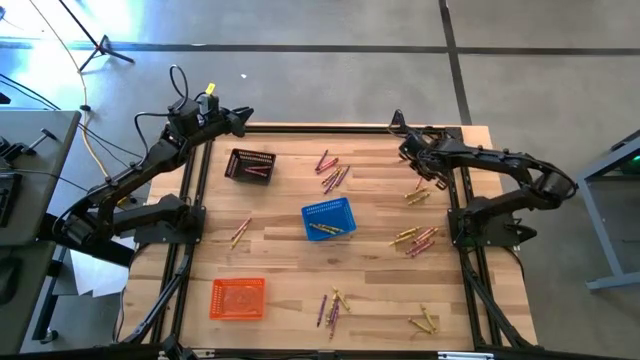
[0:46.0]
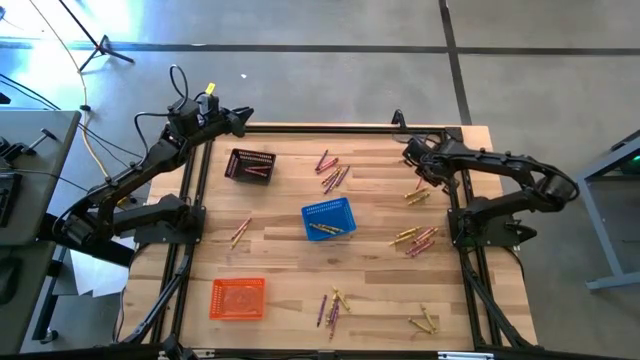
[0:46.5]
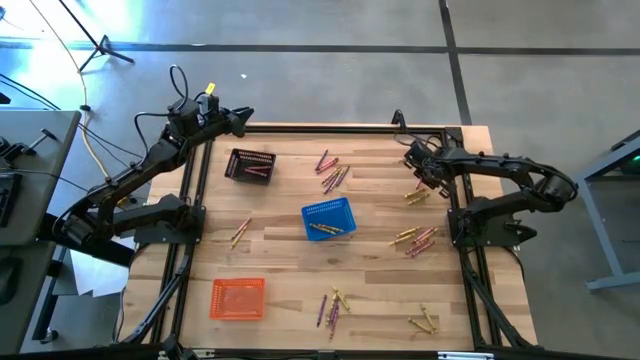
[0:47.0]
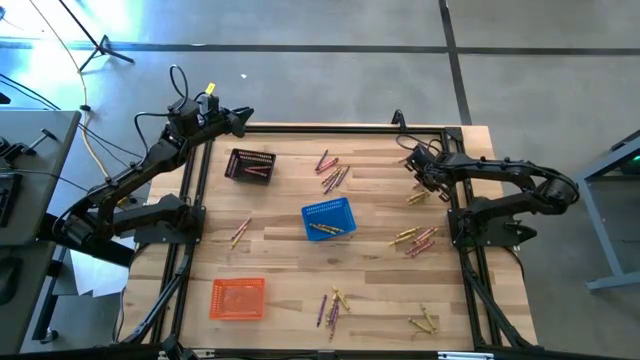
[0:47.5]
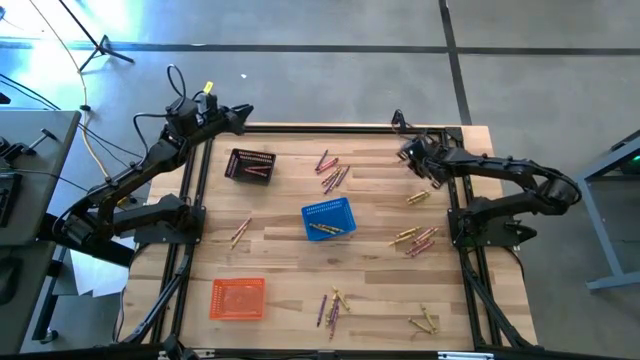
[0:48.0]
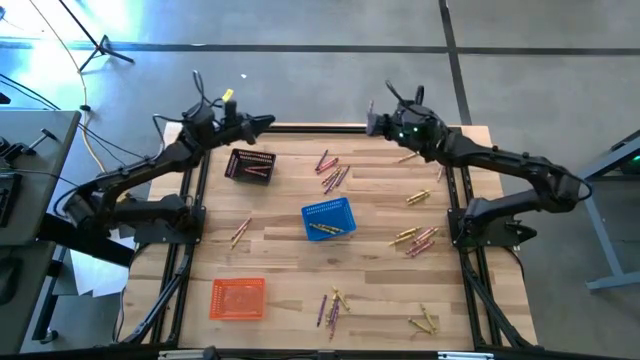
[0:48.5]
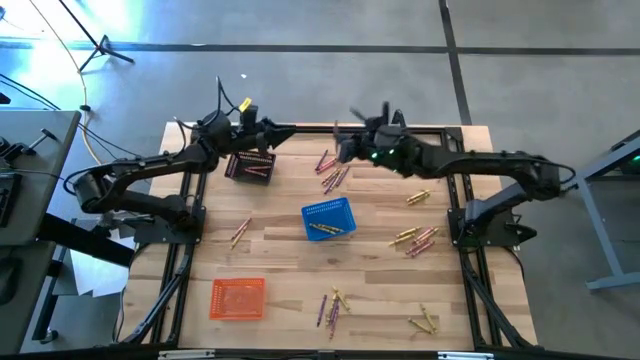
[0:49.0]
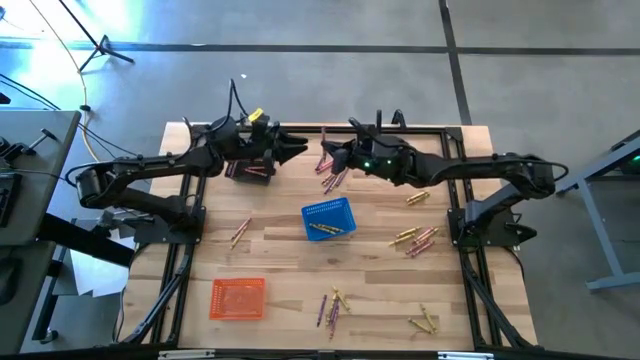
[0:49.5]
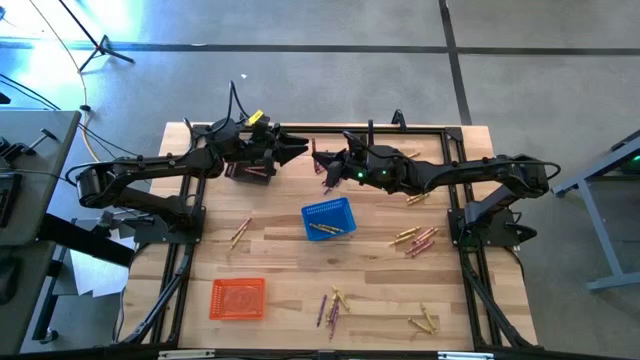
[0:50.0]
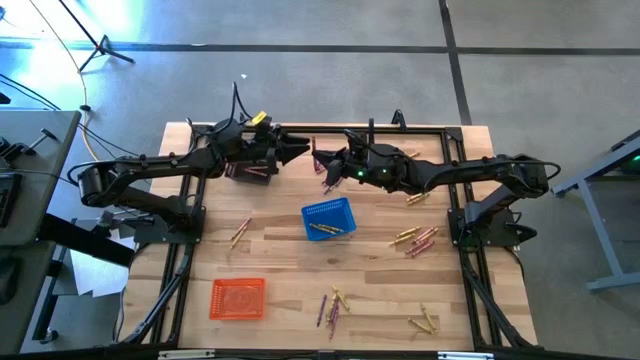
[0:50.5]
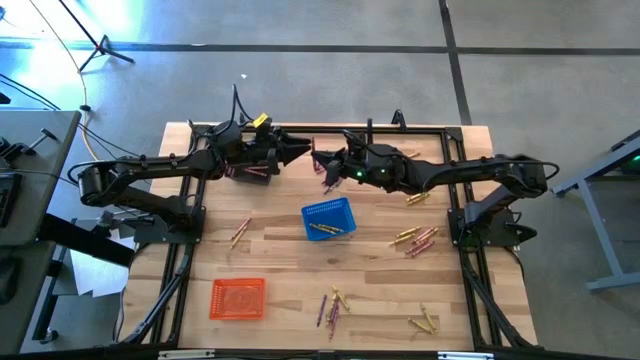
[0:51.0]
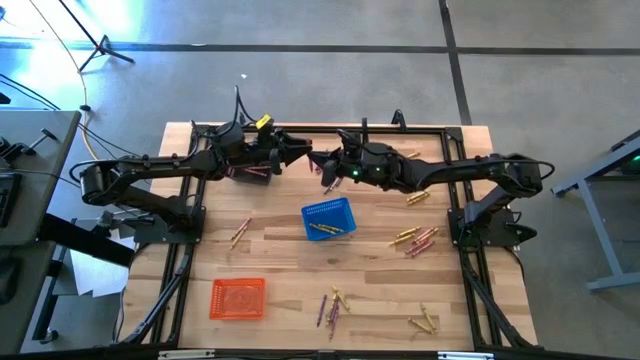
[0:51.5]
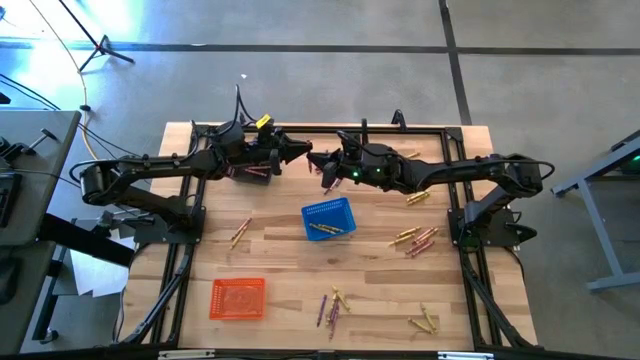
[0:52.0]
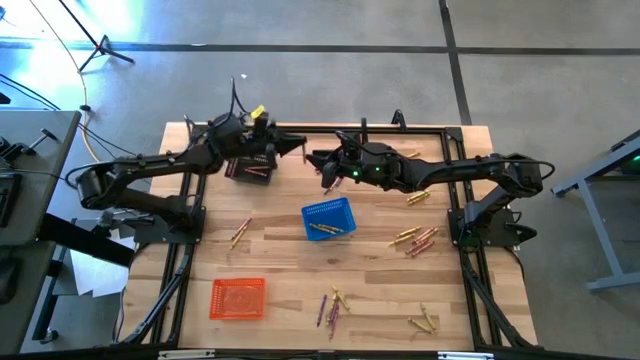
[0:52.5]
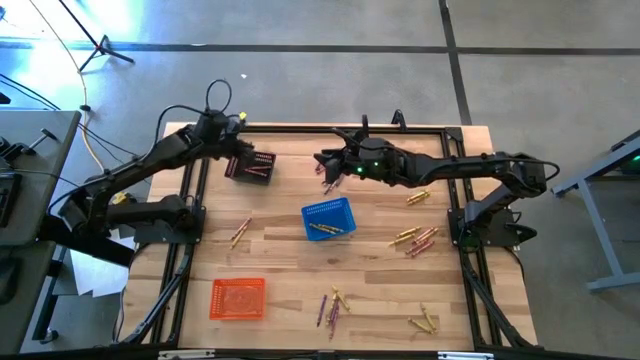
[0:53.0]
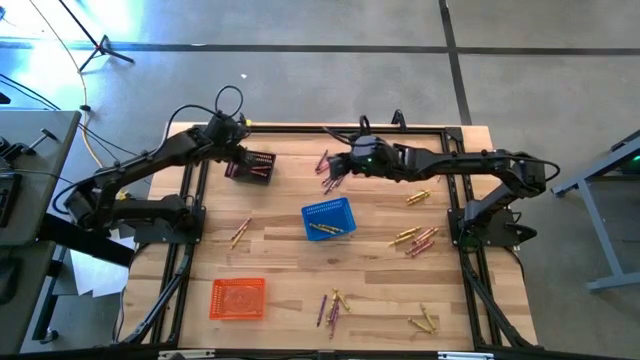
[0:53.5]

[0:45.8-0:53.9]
Task: Sort crayons
Put the red crayon into the black basket

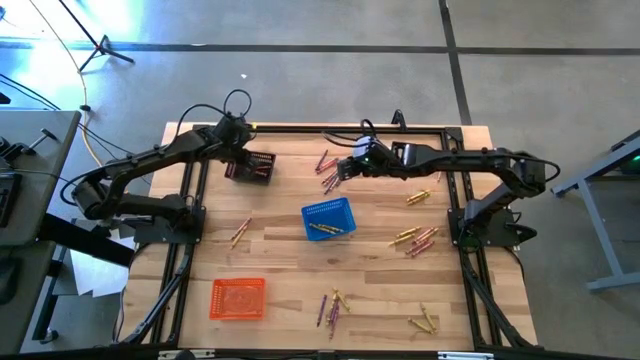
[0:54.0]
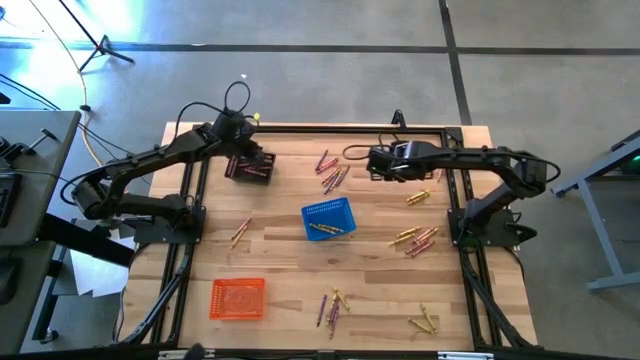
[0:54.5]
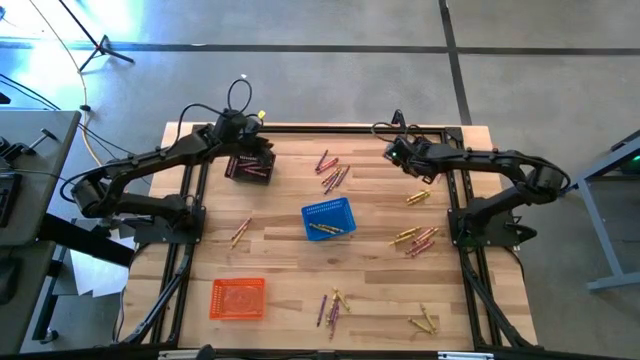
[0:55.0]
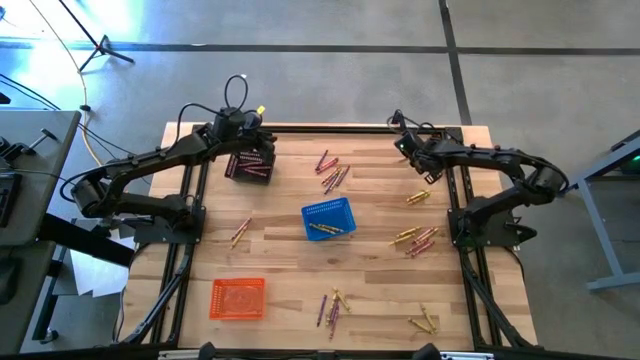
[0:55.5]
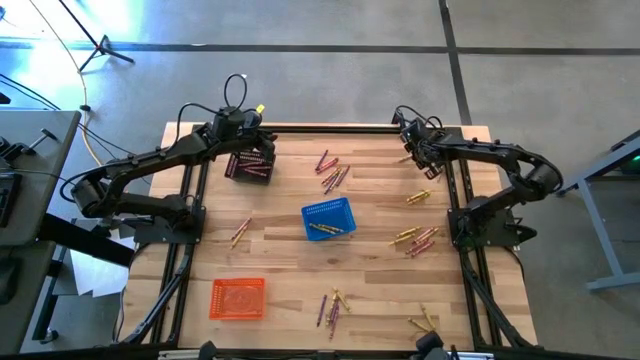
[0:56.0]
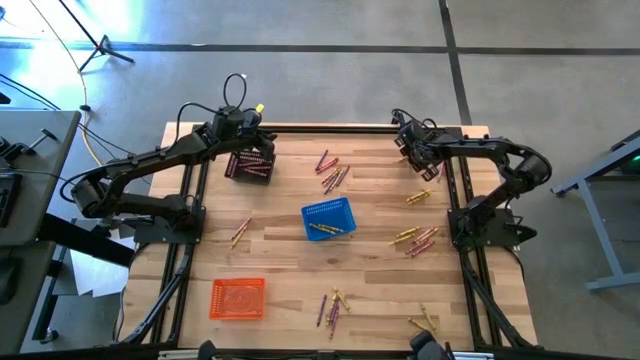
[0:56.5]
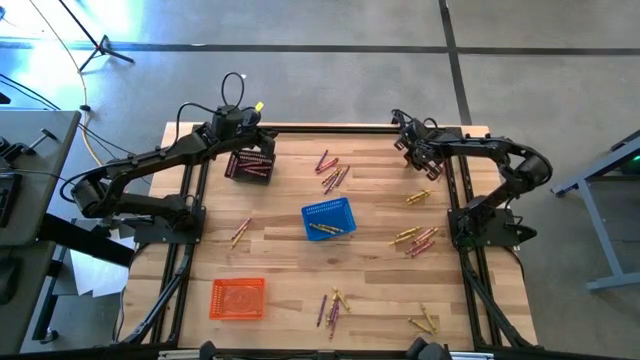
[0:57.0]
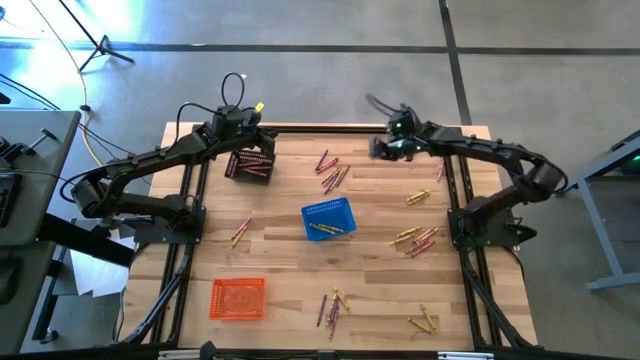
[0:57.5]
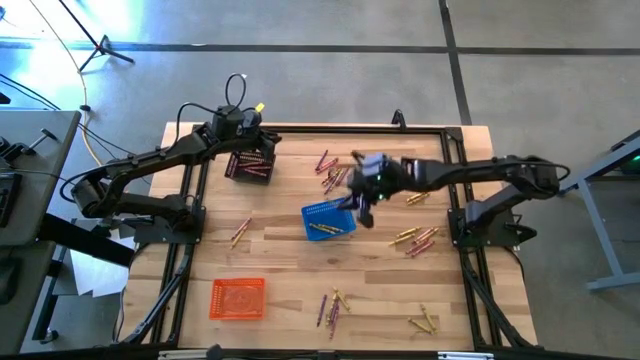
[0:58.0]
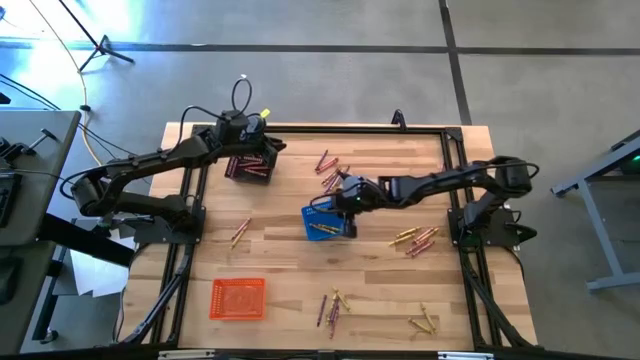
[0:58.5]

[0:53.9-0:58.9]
Put the yellow crayon into the blue basket

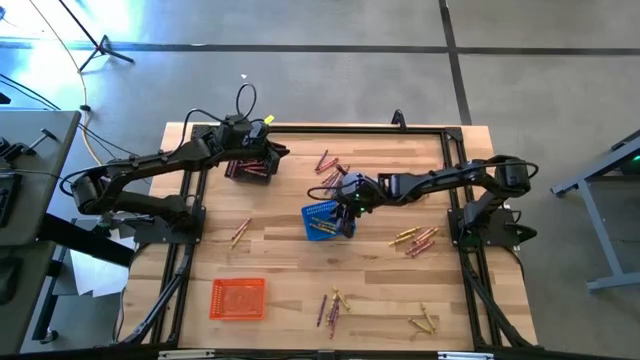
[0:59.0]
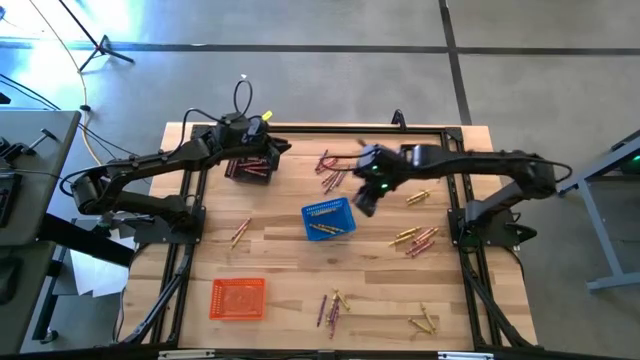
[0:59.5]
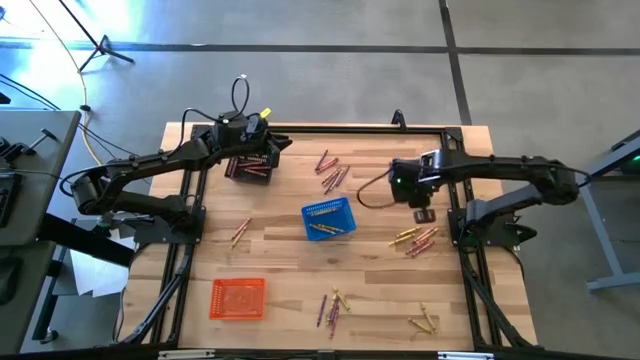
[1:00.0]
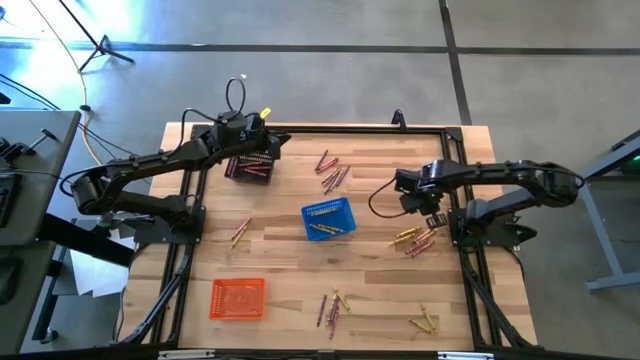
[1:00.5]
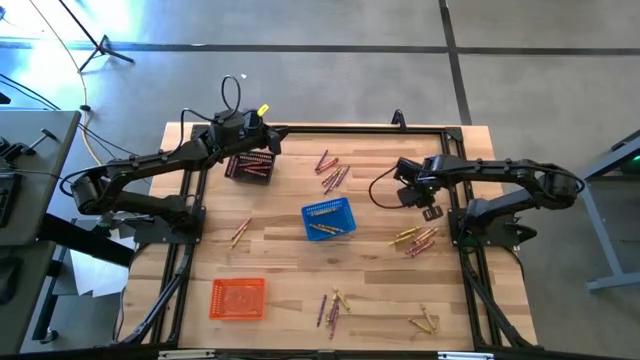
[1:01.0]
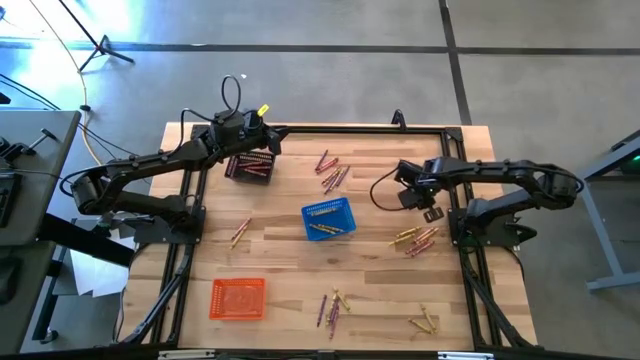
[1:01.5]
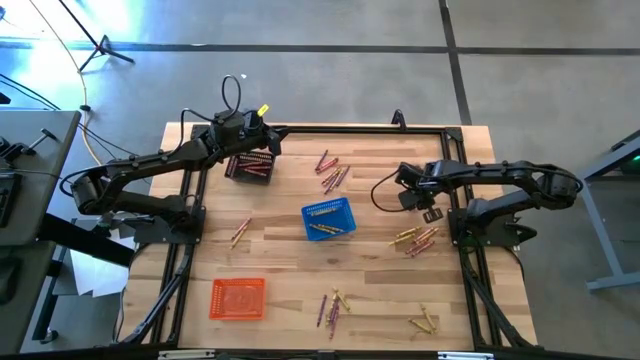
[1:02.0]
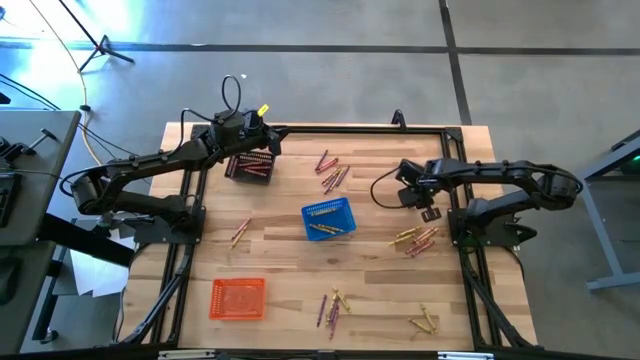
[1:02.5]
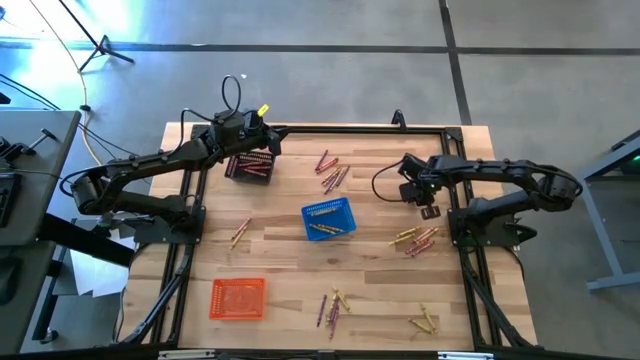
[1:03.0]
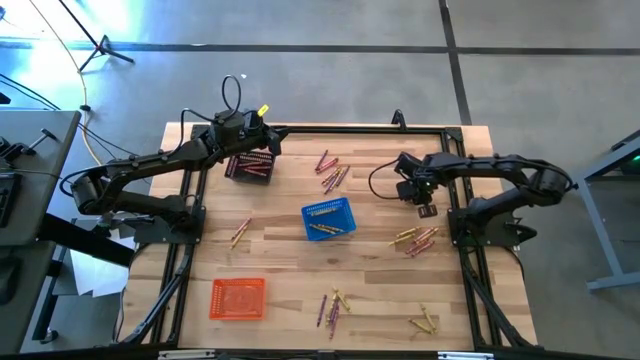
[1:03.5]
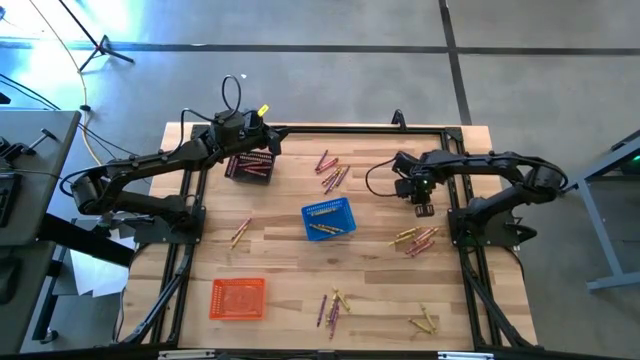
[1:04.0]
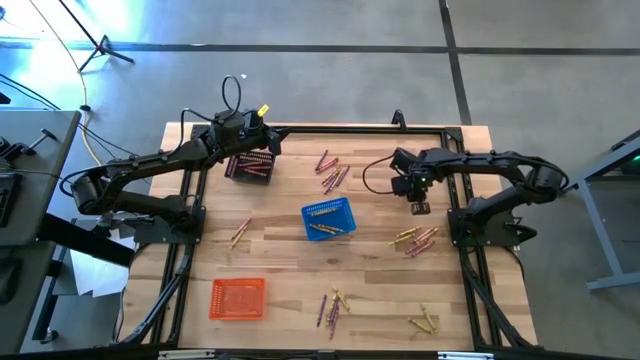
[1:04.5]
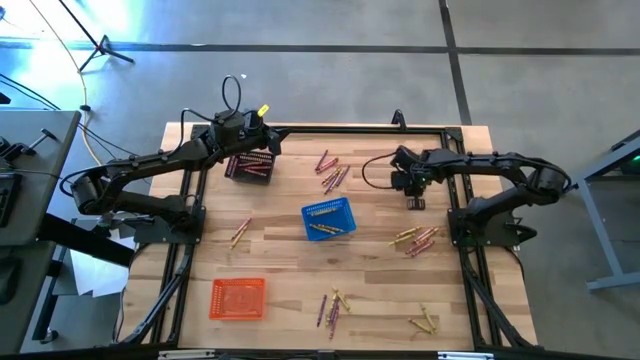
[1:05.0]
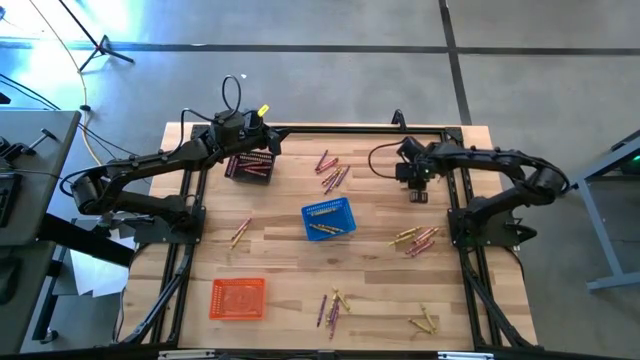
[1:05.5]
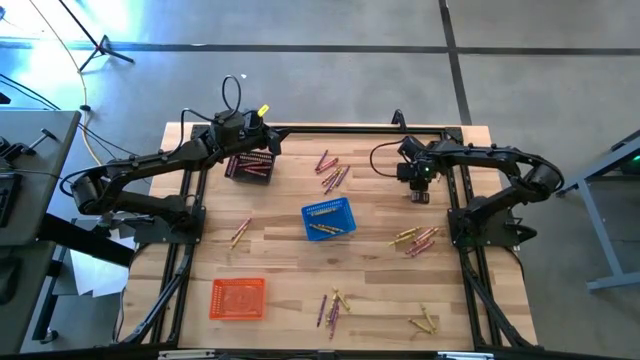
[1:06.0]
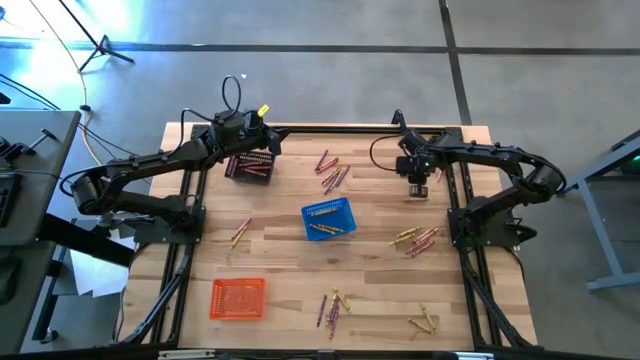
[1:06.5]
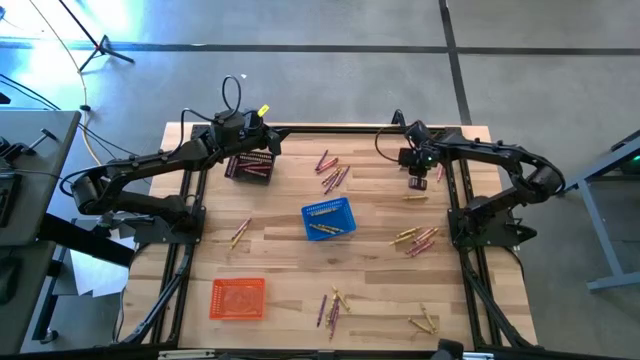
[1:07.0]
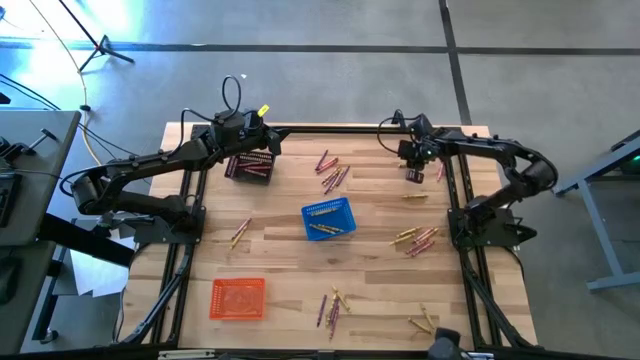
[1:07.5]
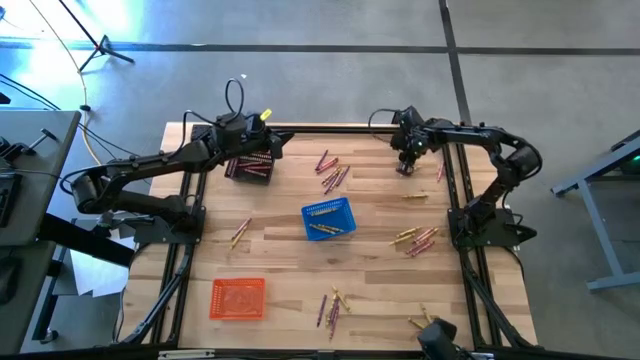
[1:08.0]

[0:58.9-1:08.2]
Put the yellow crayon into the blue basket
